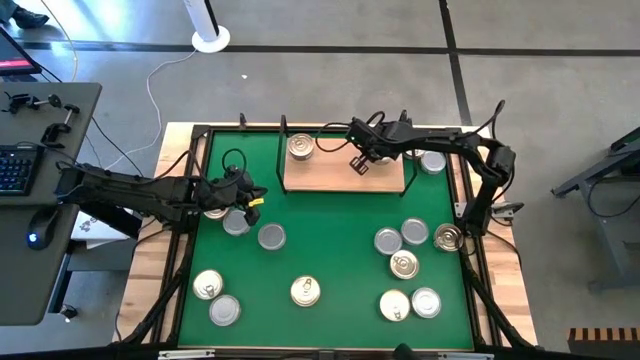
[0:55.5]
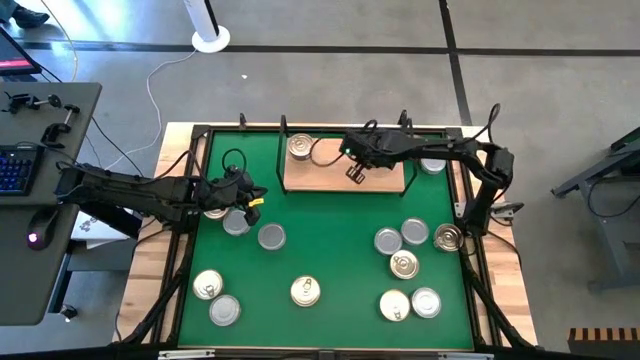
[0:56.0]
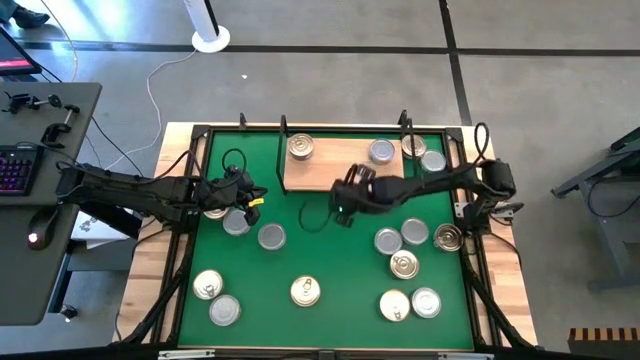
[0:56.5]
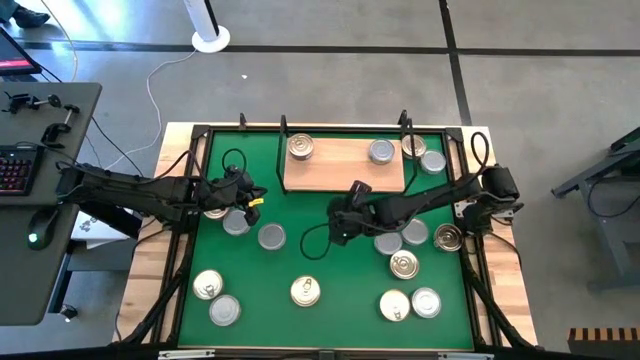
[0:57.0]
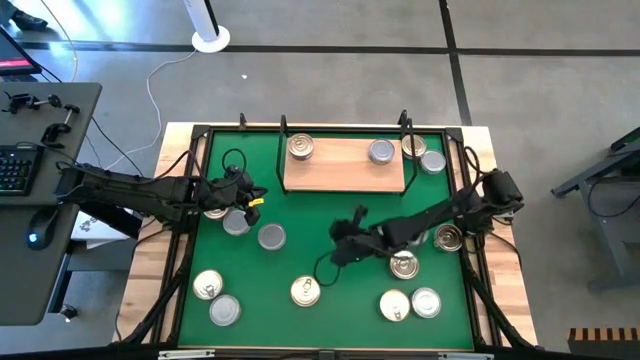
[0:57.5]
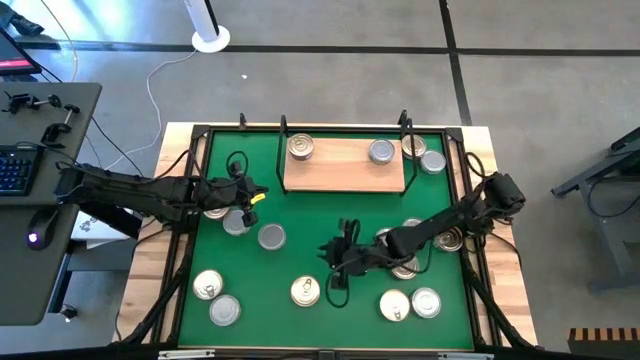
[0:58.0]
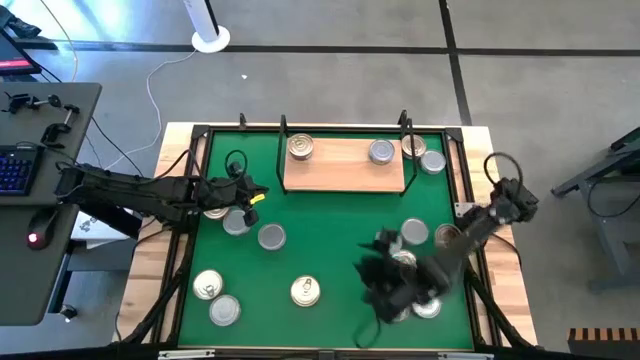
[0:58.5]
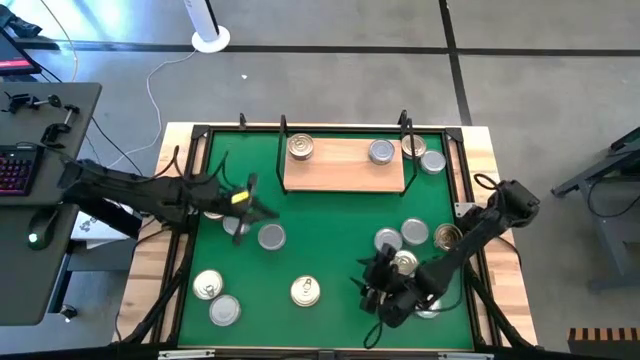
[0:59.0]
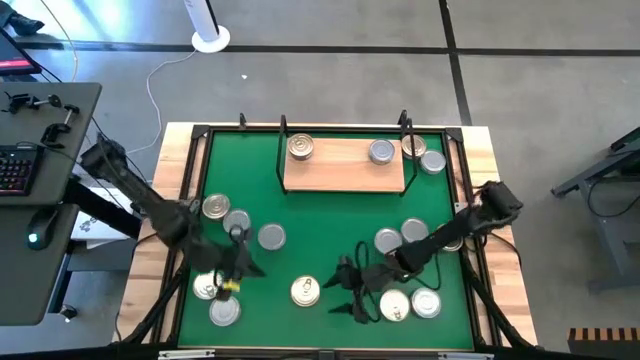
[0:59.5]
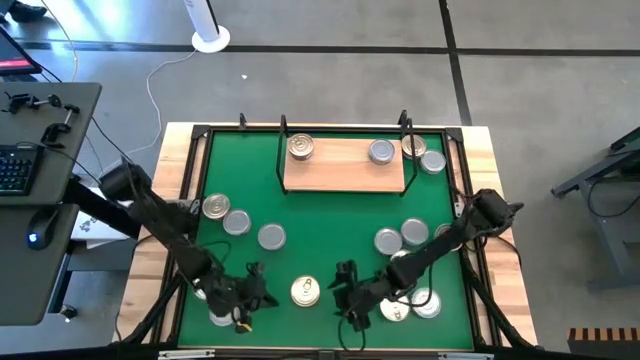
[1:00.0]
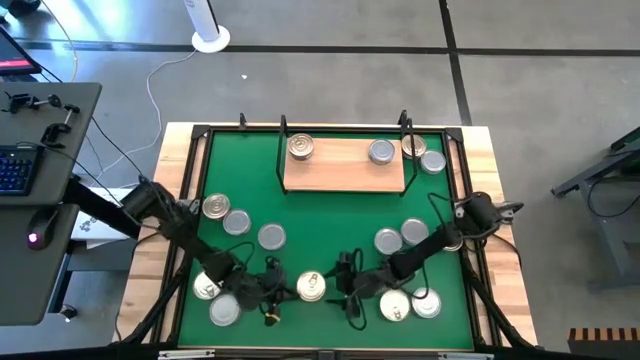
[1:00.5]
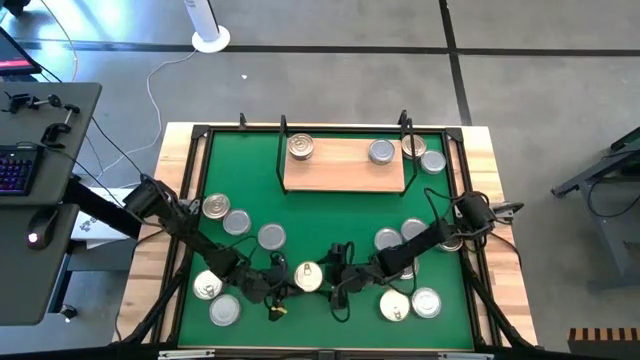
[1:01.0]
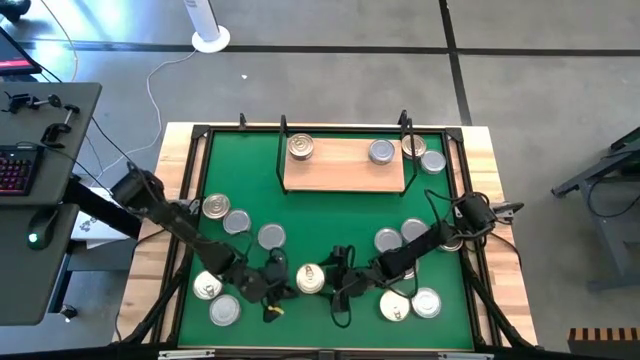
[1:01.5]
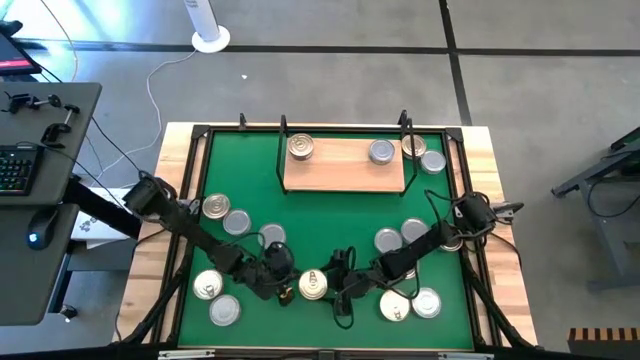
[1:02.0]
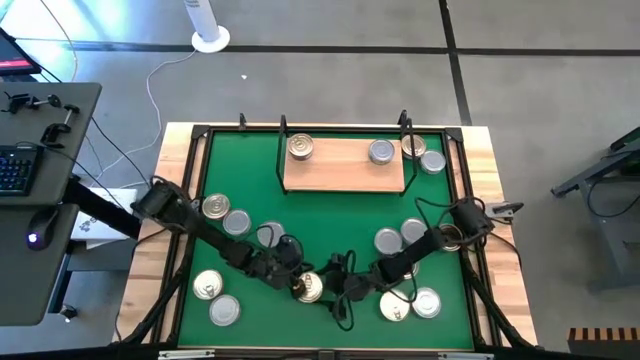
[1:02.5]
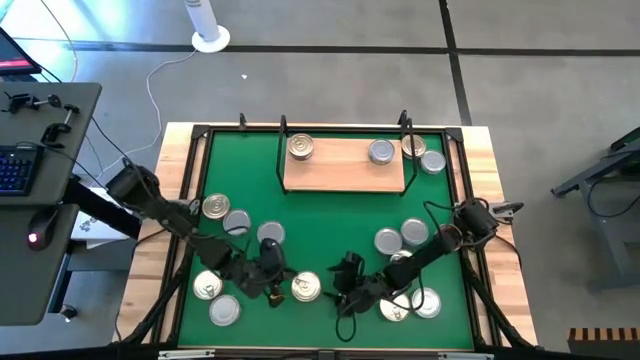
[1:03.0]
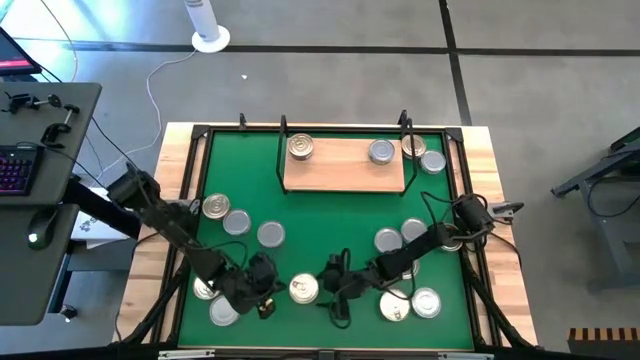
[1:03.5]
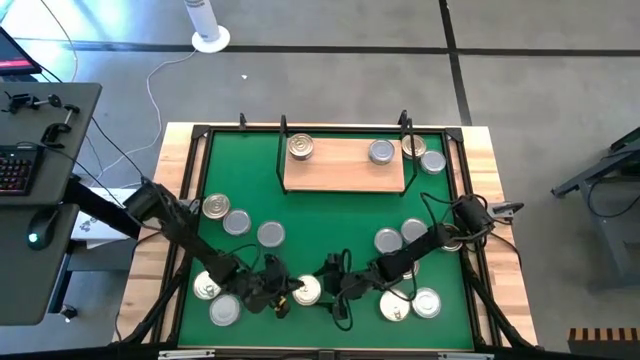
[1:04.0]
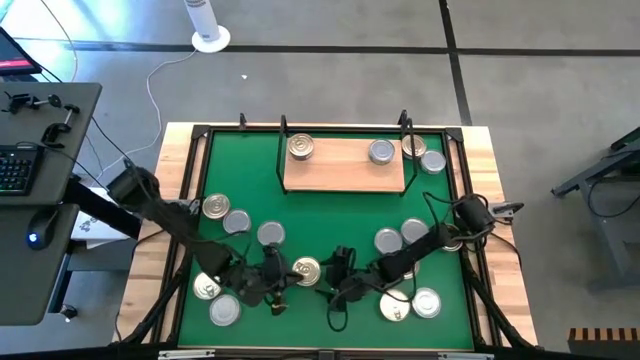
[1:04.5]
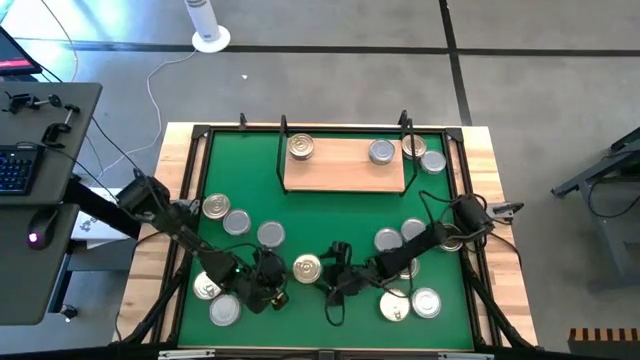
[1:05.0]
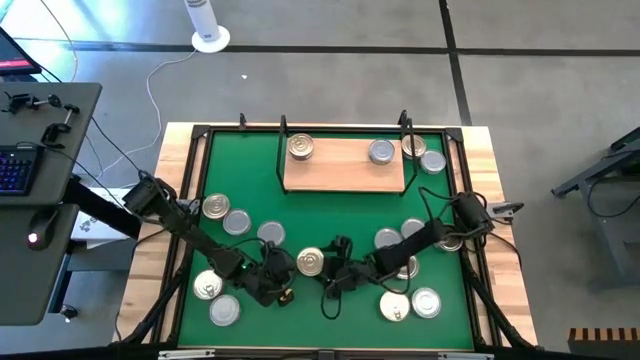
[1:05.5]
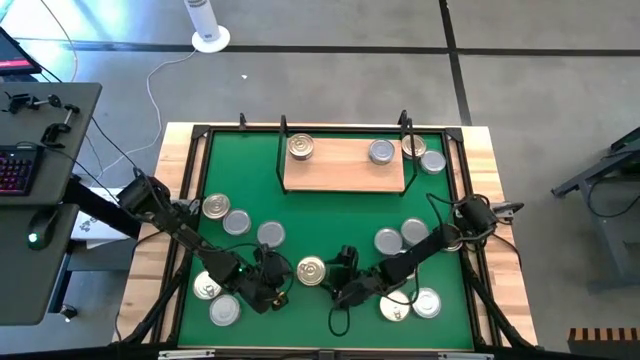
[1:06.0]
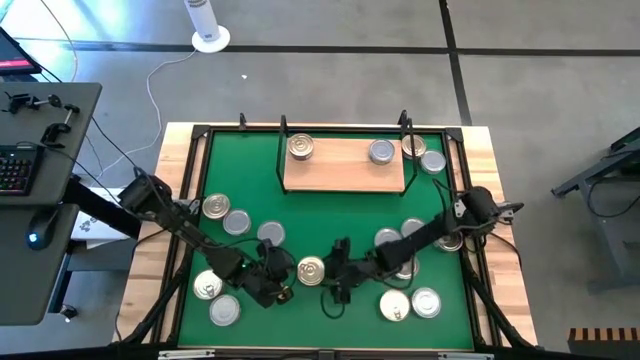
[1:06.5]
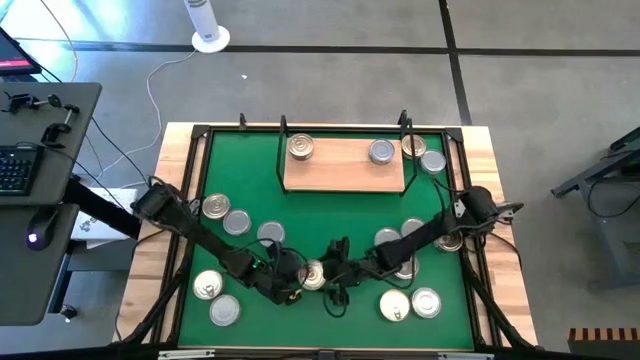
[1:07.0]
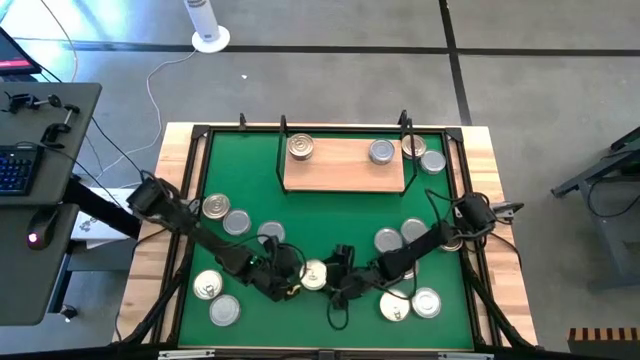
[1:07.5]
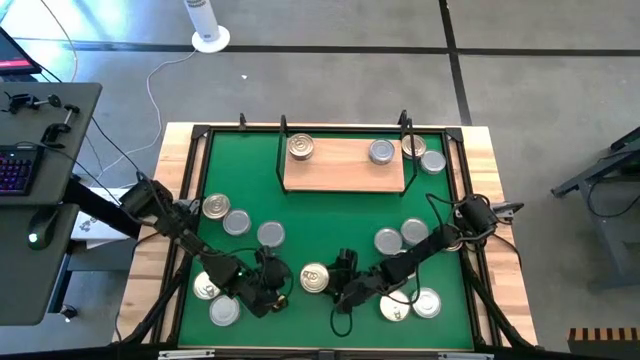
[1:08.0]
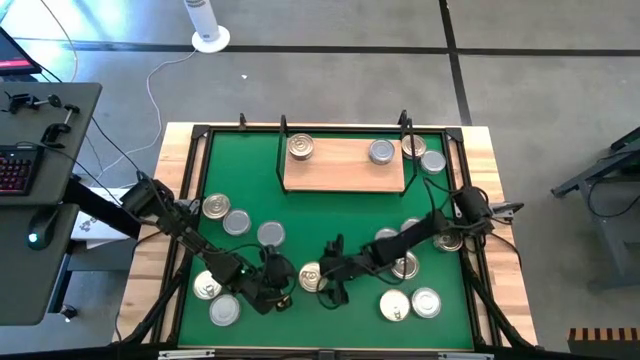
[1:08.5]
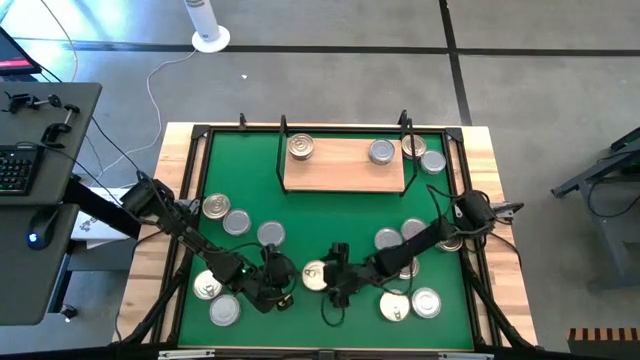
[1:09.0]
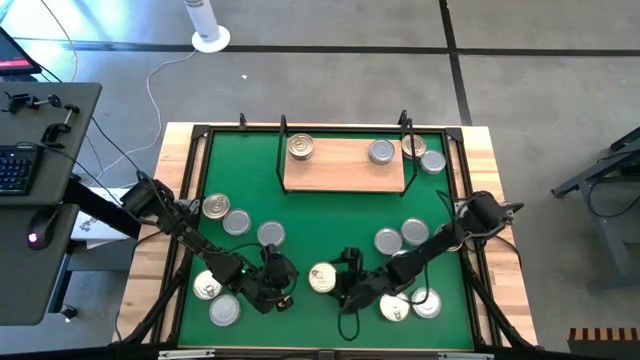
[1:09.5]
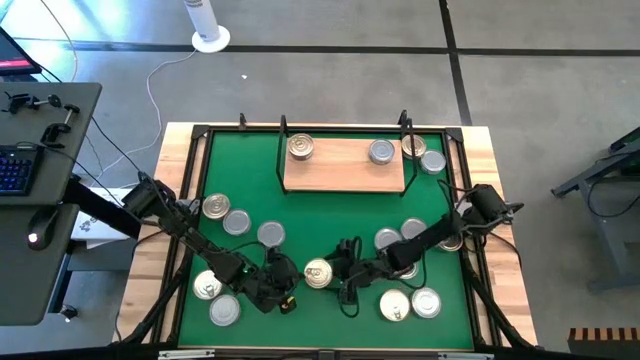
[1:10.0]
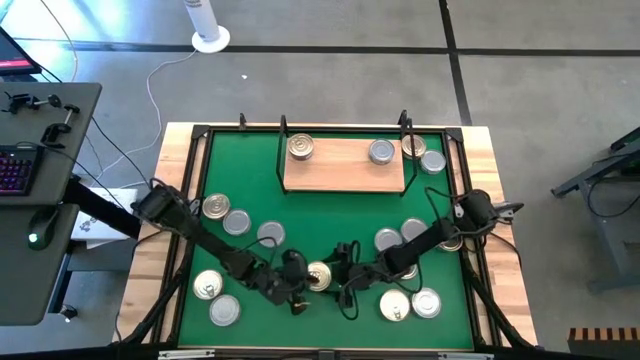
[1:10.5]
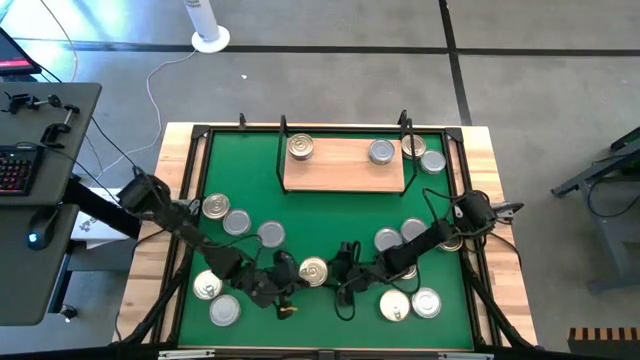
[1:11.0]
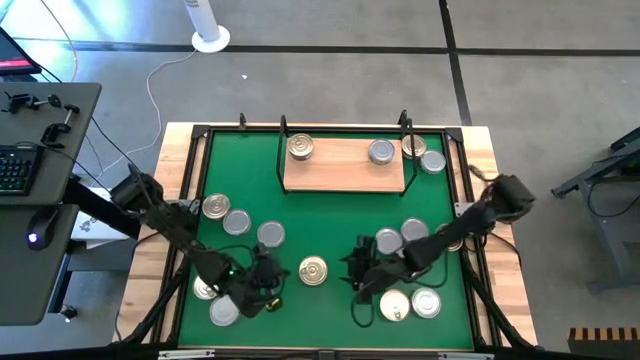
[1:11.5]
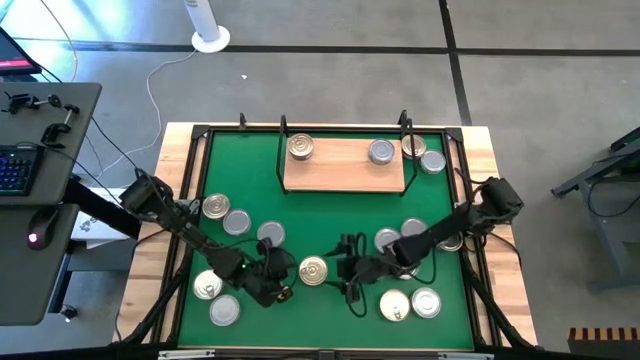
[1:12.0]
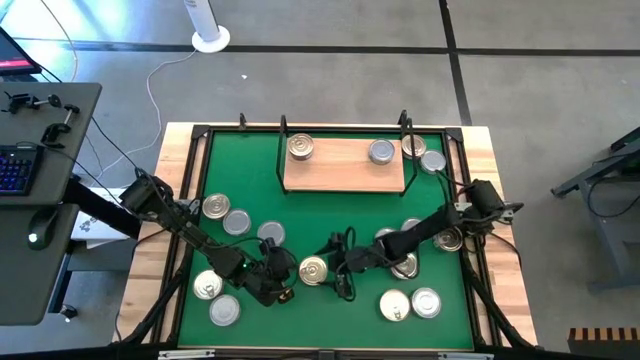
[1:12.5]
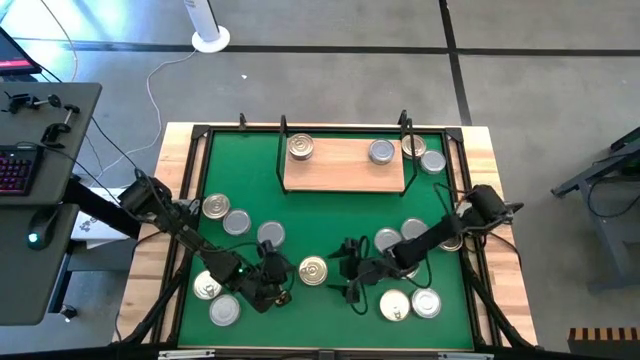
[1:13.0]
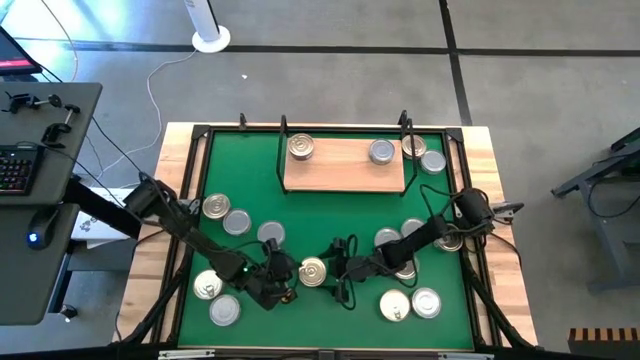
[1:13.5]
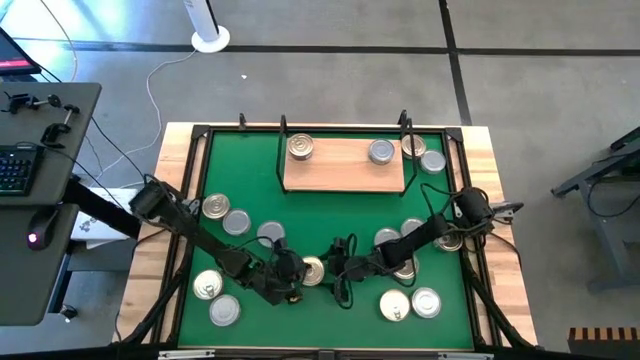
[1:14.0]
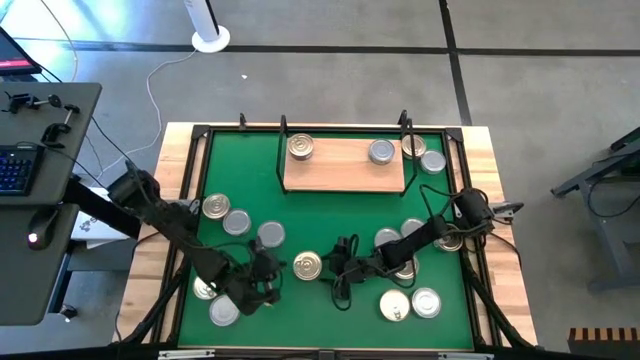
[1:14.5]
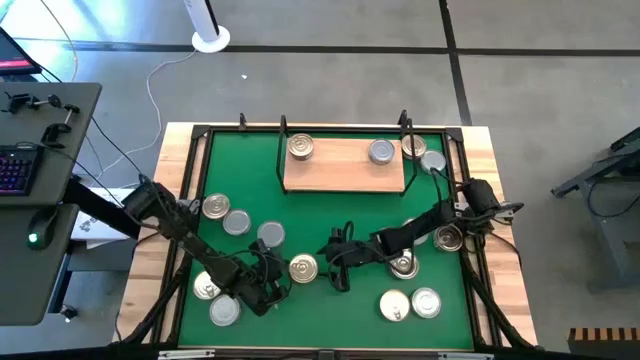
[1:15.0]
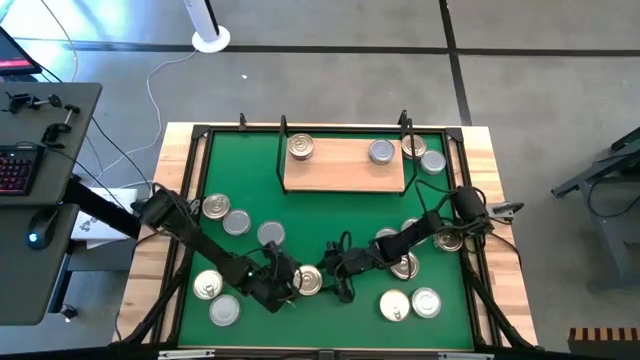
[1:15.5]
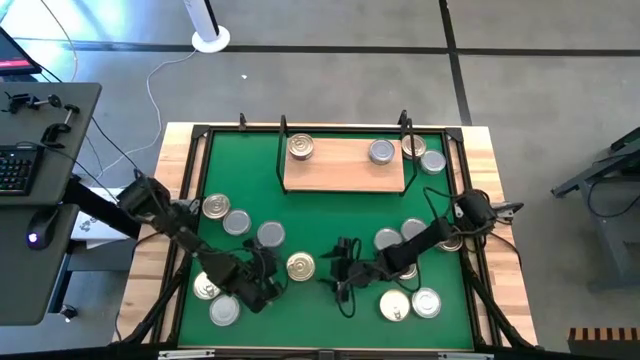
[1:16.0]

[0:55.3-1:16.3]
Task: Stack canned seafood by type on shelf
Put the blue/pink tuna can on the shelf

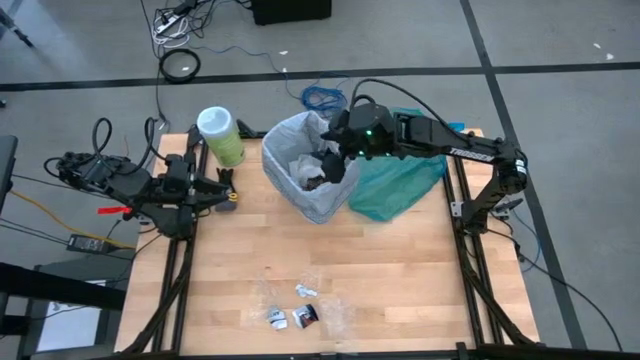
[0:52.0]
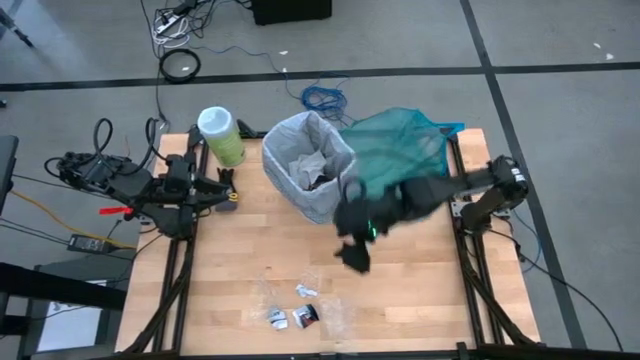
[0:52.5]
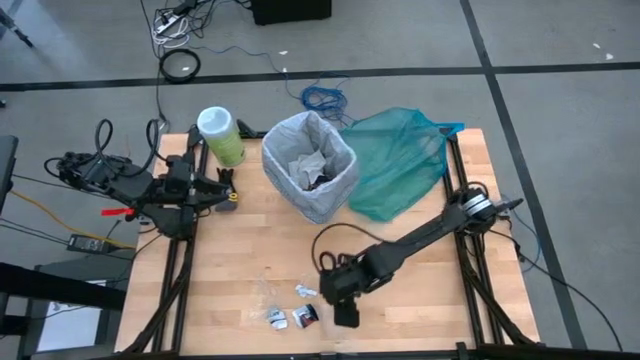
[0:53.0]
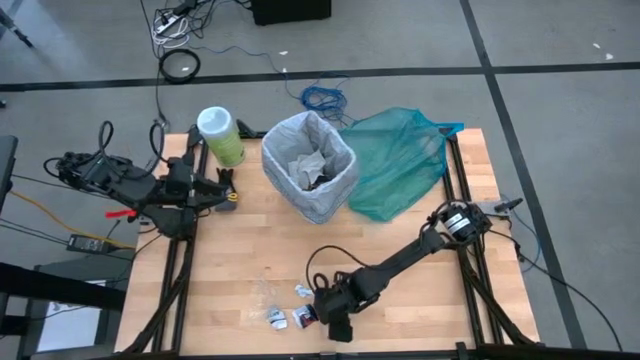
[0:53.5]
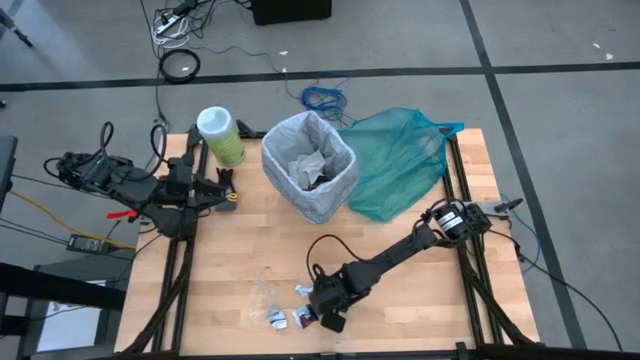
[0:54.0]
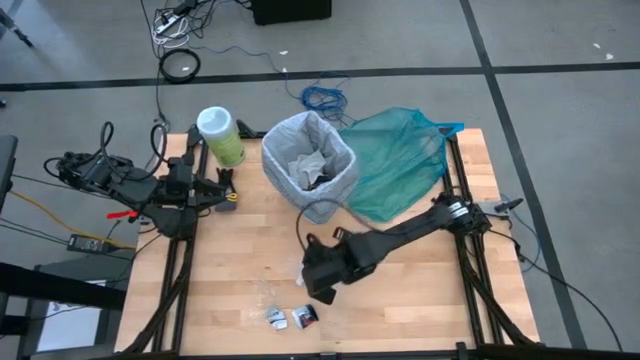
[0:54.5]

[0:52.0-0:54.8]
Task: place trash/remove bag and relplace
Put the transparent plastic into the trash bin
